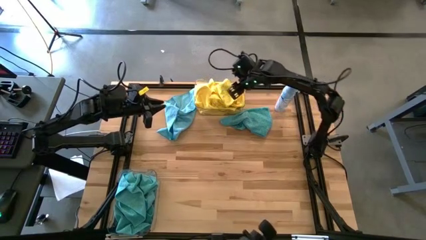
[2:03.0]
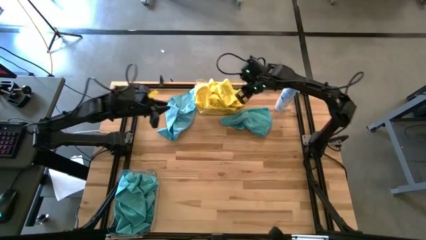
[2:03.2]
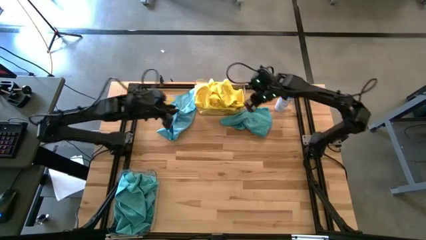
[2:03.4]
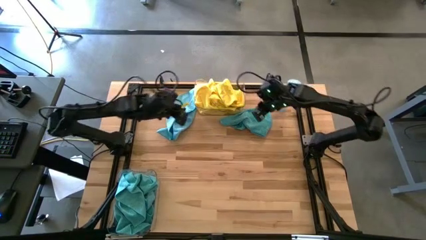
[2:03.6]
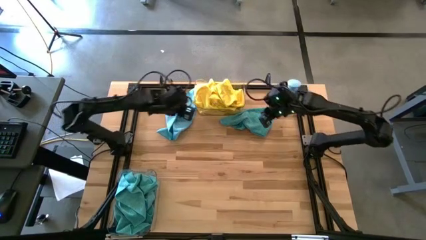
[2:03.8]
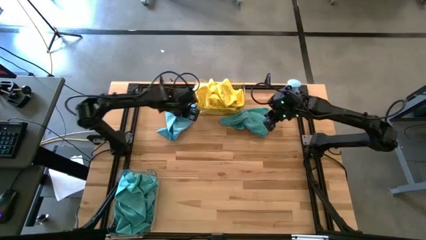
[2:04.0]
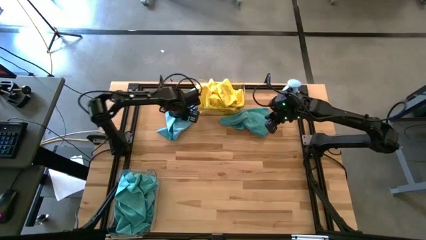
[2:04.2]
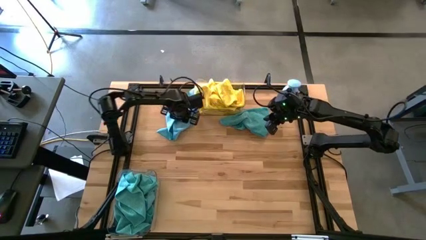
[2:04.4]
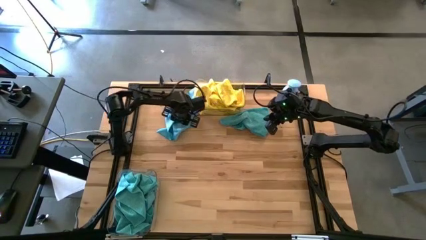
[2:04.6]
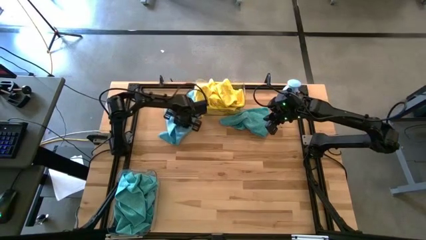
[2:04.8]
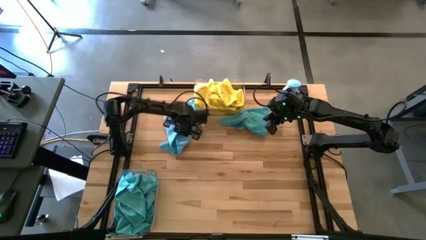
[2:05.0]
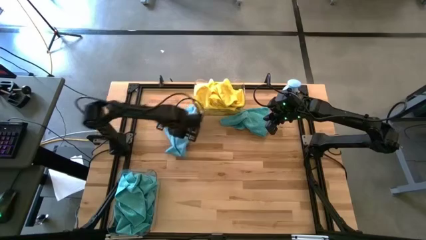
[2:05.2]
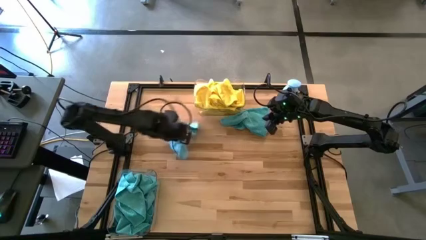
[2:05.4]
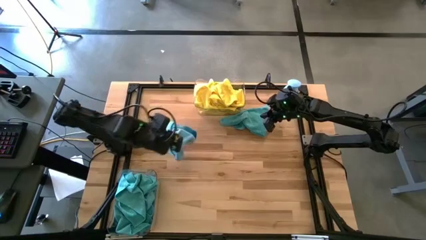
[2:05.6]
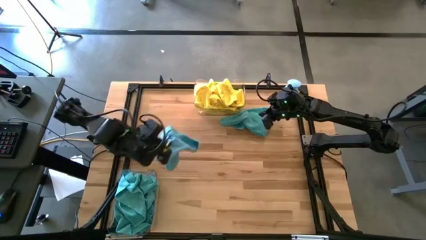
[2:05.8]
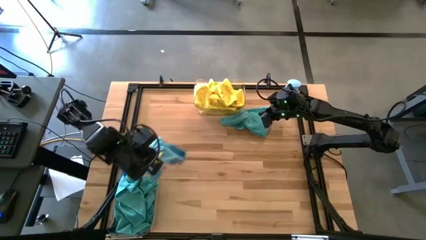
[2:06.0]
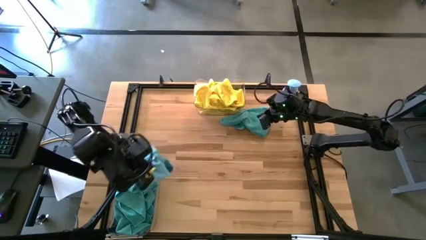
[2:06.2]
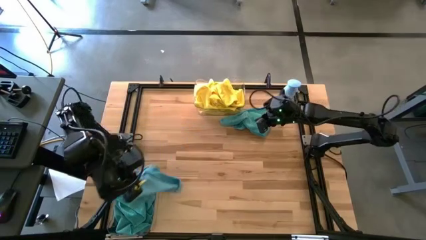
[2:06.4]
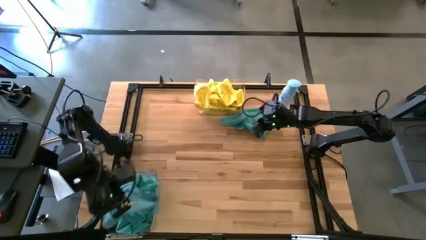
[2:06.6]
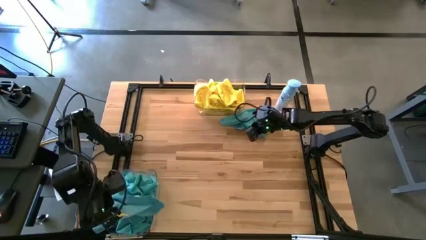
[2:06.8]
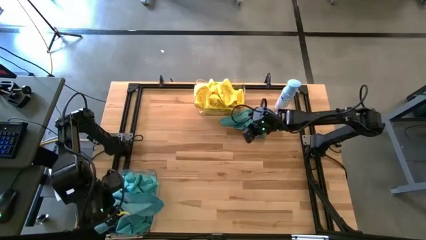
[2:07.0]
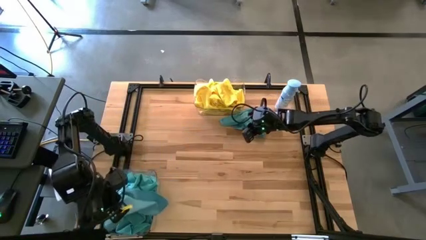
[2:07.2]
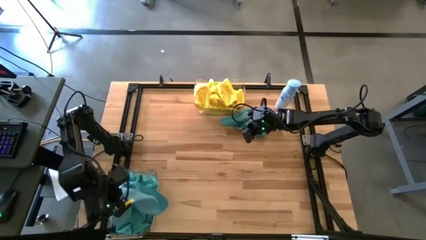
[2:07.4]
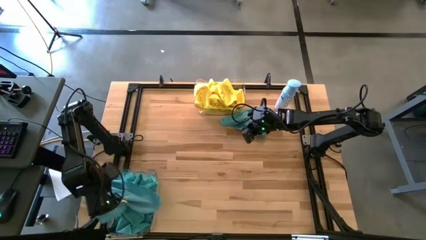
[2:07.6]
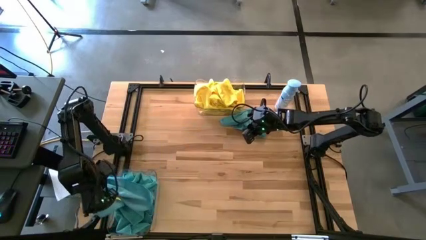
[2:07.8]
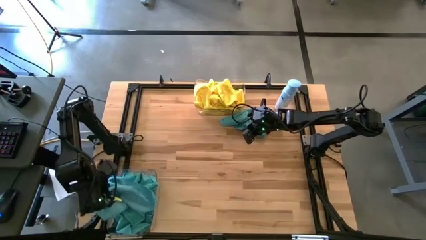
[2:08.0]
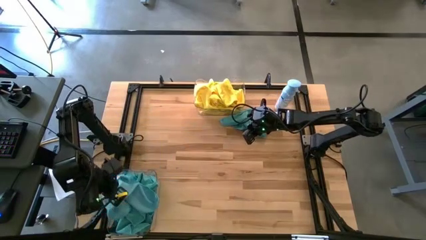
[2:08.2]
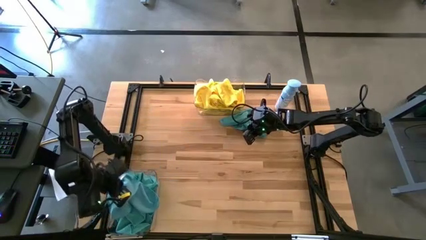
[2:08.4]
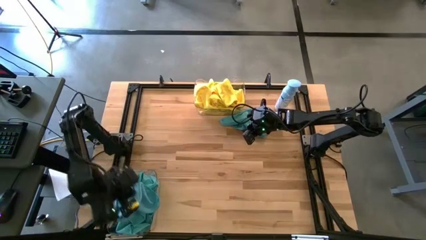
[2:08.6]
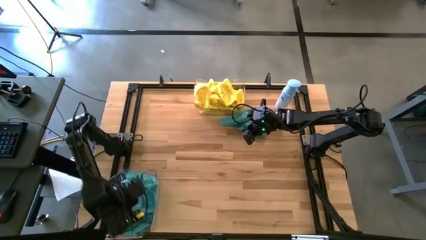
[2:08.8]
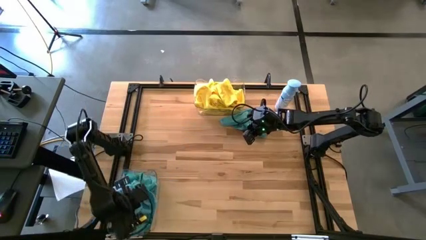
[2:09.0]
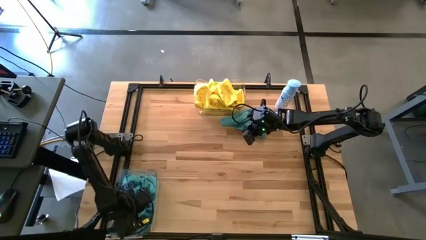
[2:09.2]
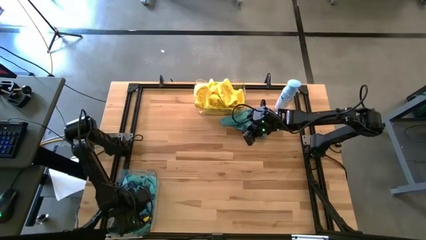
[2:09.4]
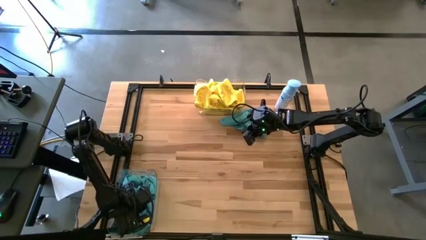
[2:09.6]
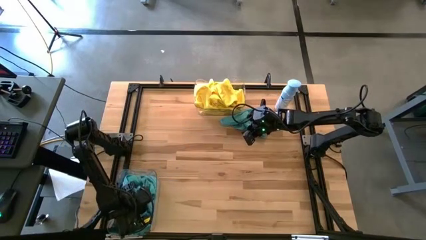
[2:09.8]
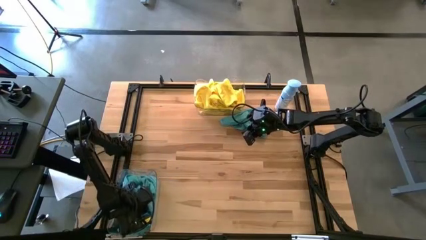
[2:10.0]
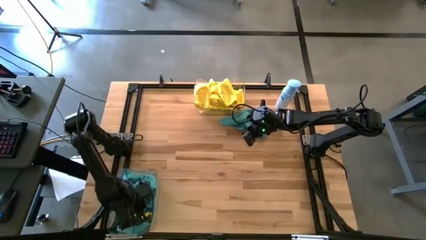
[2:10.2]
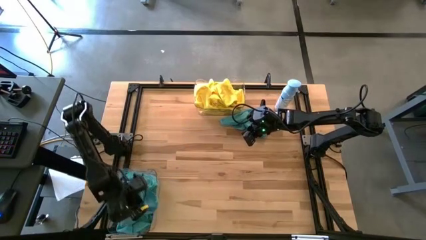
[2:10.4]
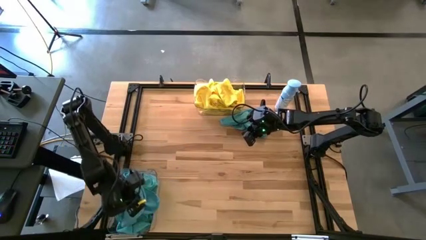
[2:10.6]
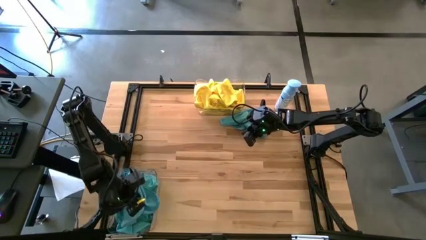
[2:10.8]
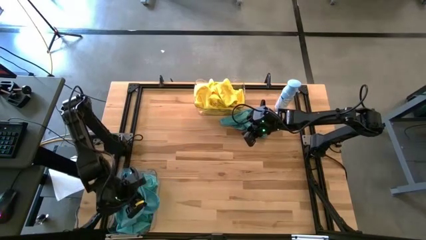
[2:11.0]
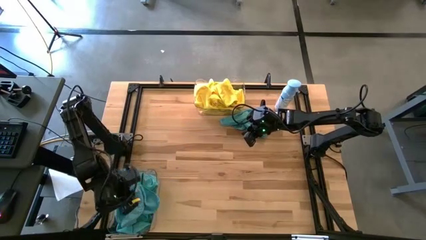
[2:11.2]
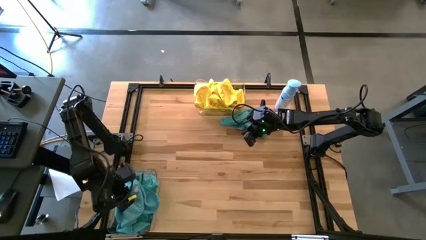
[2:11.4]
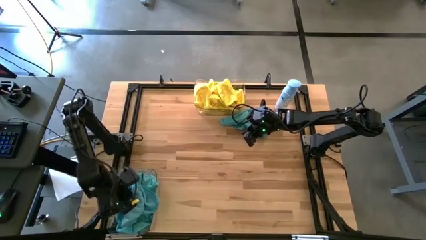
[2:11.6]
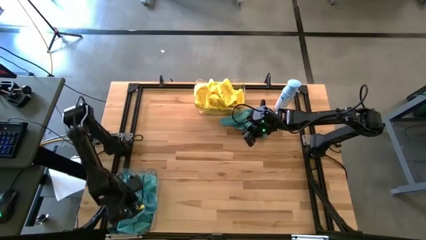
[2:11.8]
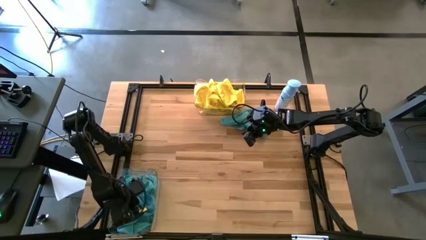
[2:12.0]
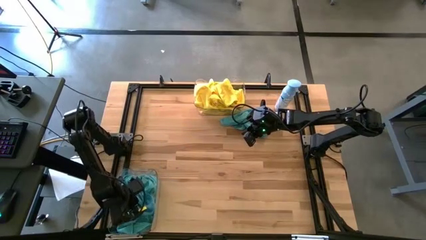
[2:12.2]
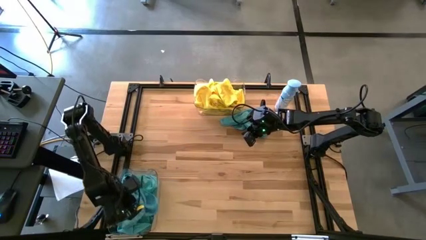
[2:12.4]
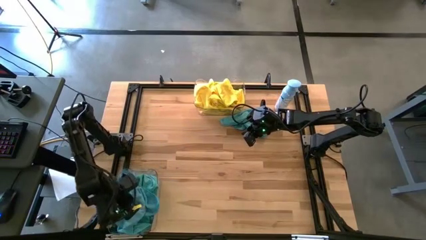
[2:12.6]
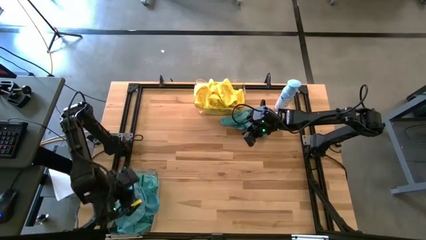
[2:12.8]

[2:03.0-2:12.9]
Task: Sort microfiber towel by color & place in baskets
Put the blue microfiber towel into the bottom transparent bin

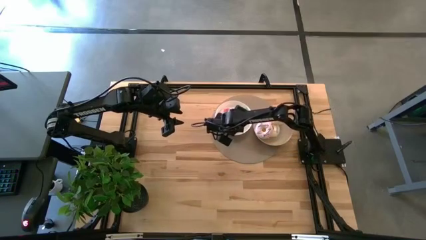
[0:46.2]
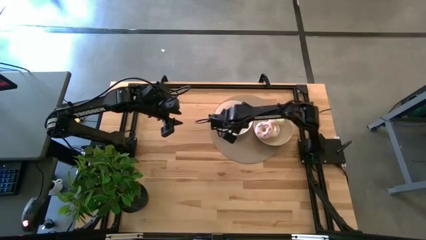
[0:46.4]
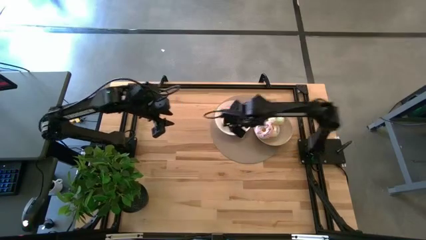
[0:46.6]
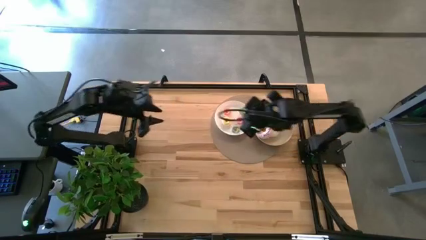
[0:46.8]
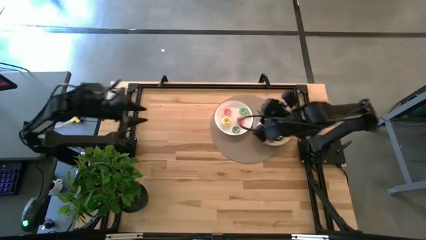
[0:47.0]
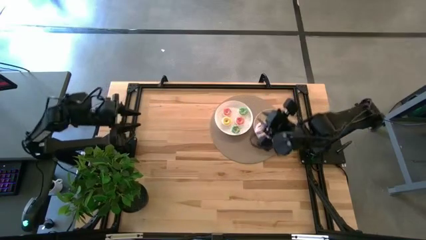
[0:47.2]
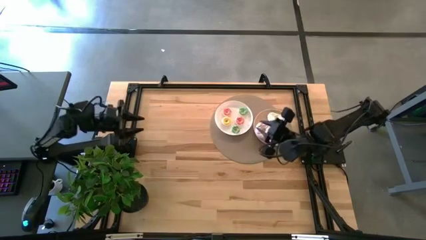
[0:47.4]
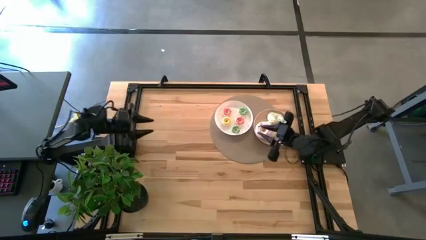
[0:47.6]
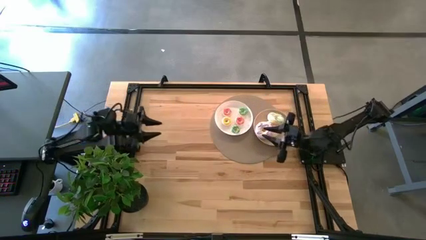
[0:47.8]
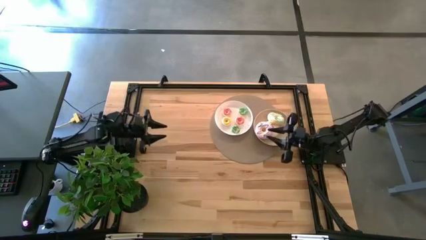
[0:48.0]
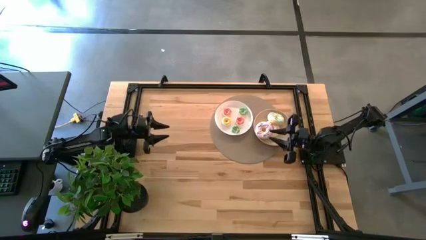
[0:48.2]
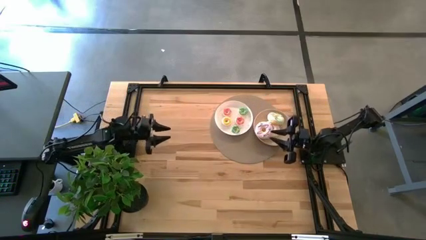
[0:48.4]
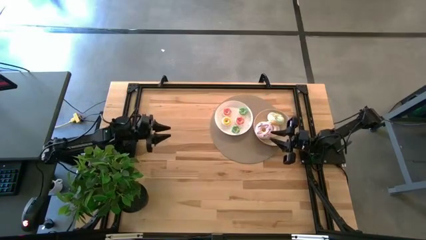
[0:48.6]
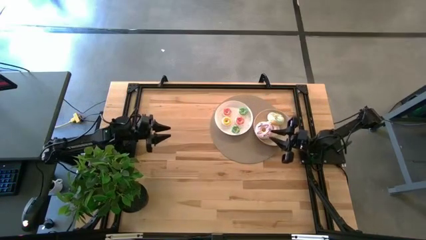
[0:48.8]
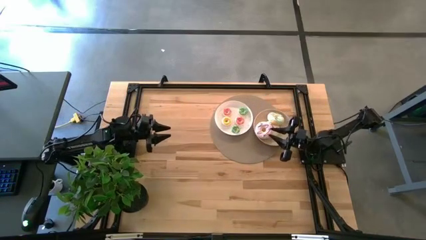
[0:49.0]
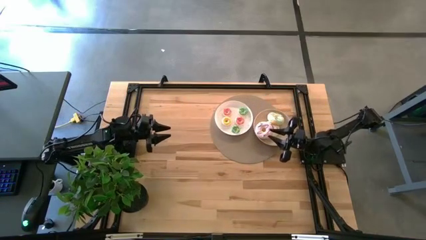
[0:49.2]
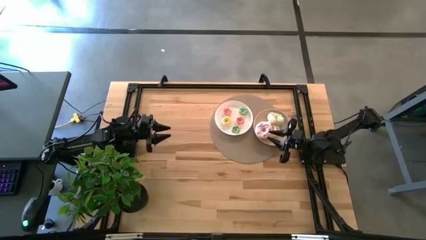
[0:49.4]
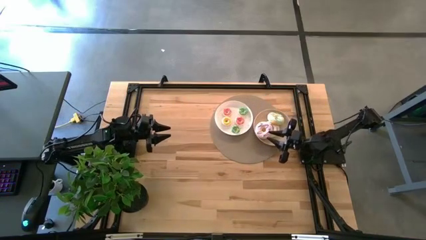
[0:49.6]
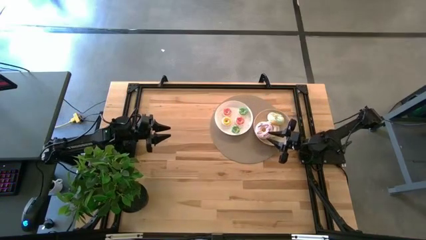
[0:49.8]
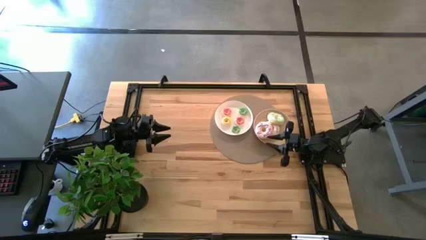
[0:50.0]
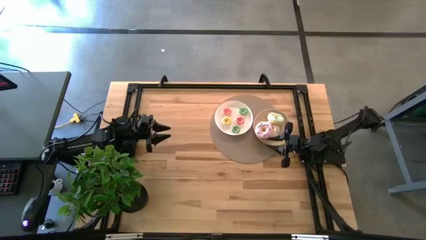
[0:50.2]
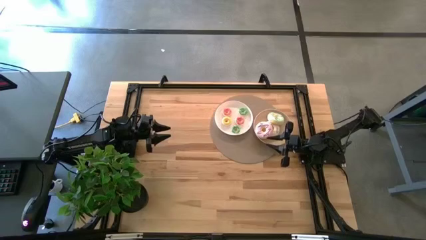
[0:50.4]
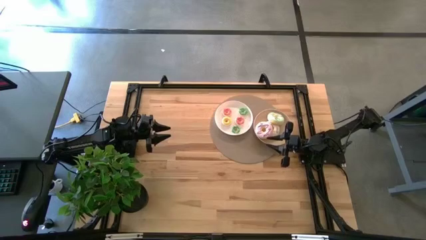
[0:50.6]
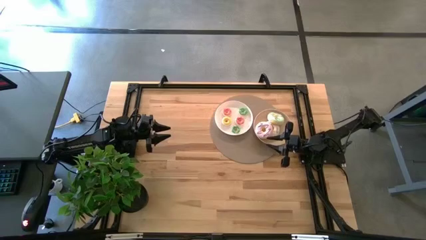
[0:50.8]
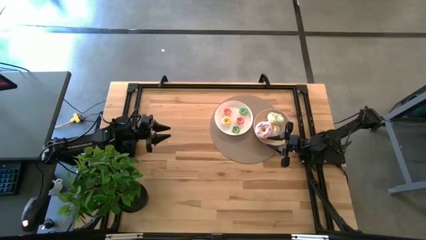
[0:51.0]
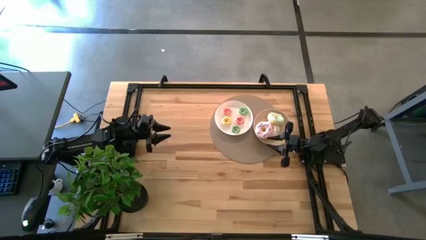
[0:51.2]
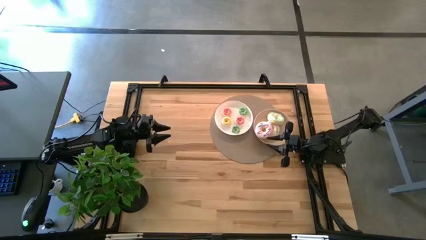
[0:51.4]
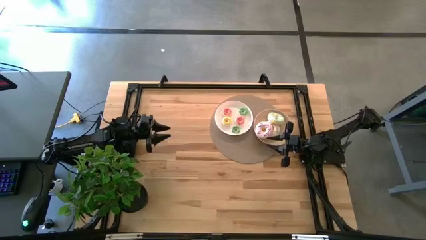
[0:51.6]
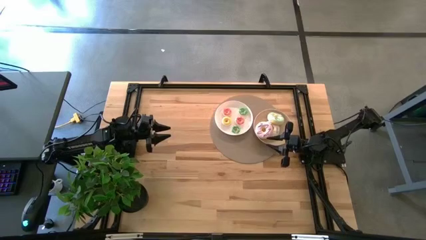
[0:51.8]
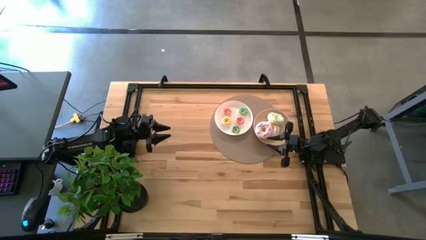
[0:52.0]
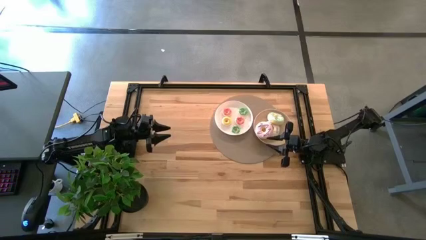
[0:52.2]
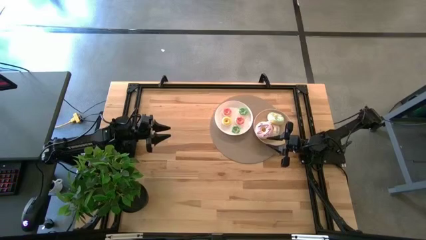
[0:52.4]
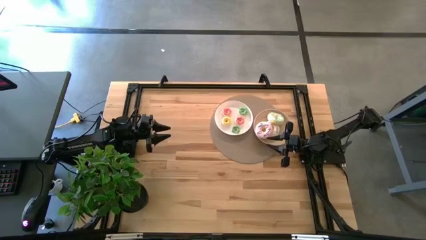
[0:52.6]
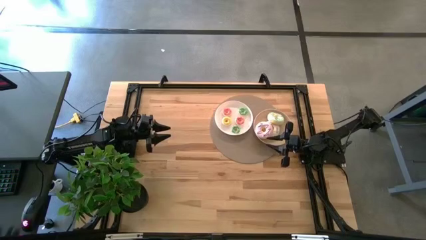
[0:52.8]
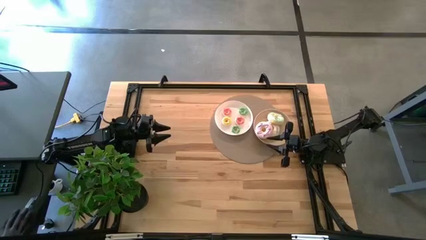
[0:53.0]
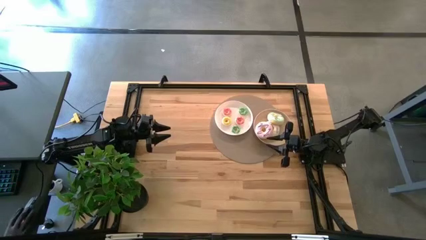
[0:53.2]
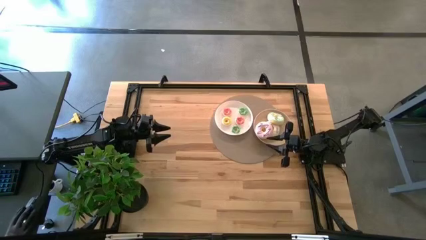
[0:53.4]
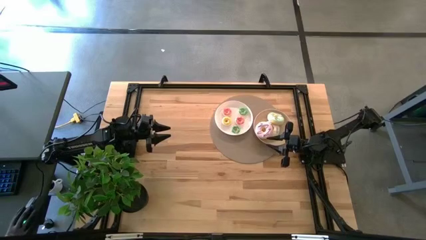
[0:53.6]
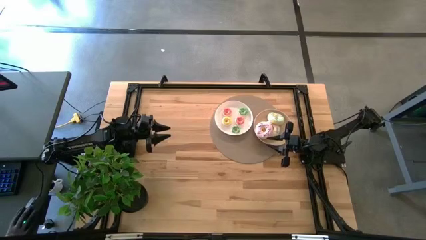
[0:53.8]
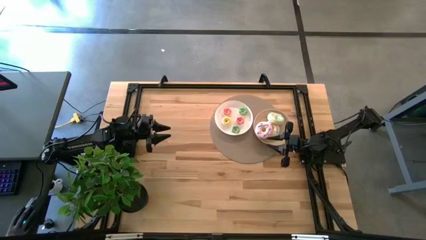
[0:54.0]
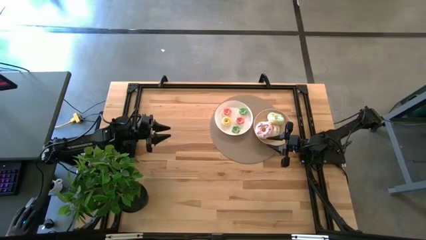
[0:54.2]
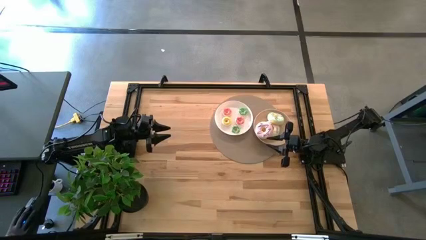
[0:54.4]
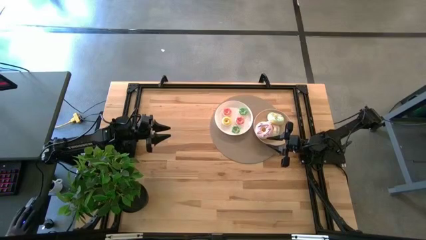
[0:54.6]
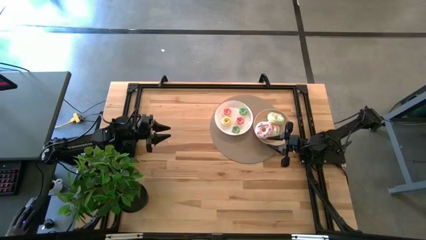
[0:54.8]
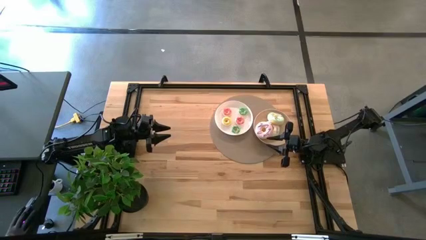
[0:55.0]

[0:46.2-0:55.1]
Task: Pick & Place donuts
Return to Home Position
